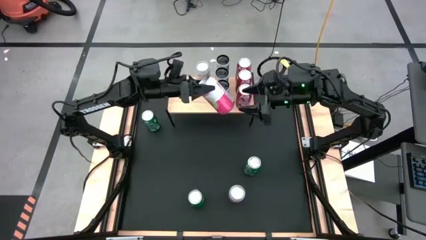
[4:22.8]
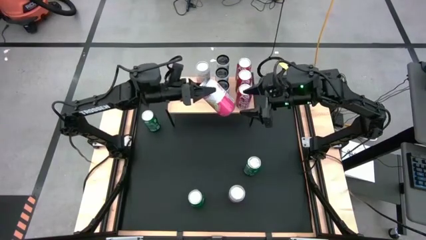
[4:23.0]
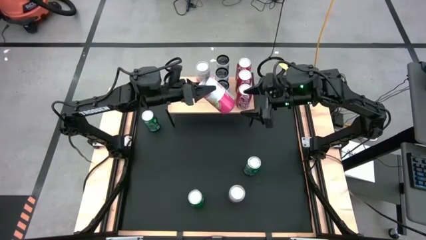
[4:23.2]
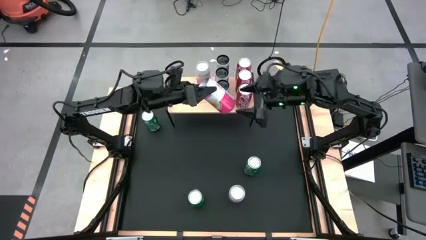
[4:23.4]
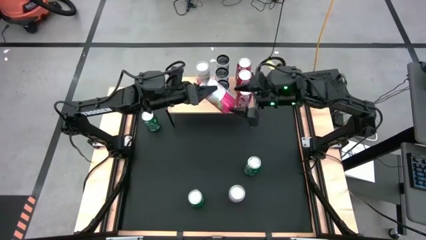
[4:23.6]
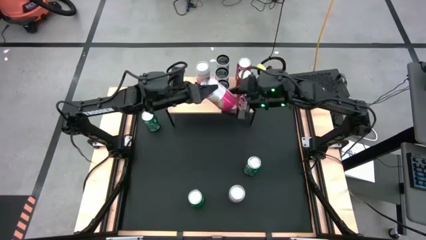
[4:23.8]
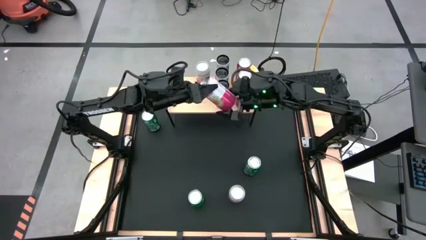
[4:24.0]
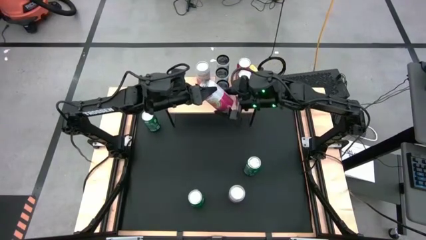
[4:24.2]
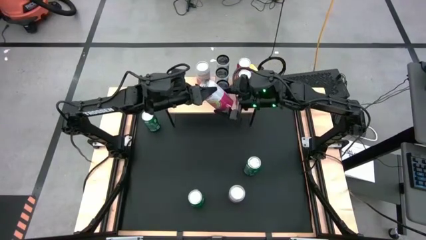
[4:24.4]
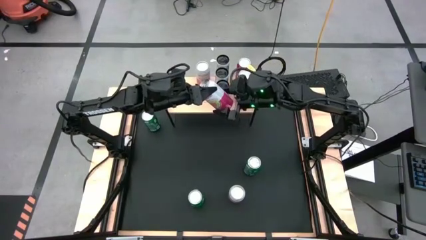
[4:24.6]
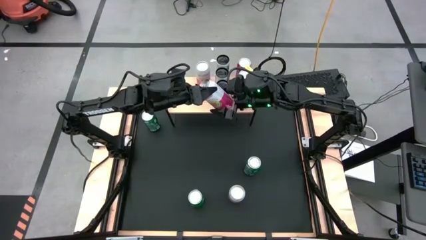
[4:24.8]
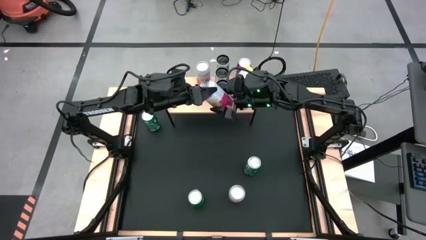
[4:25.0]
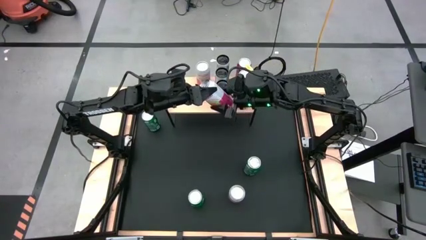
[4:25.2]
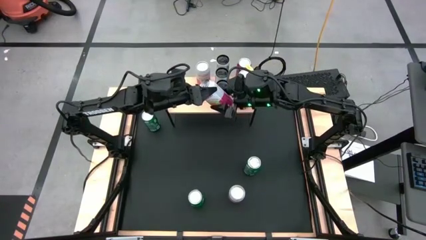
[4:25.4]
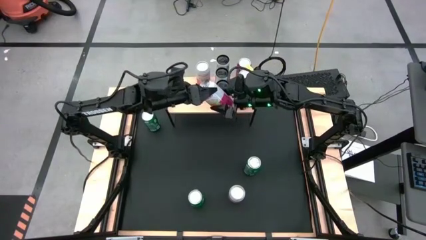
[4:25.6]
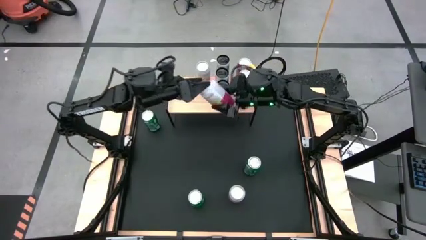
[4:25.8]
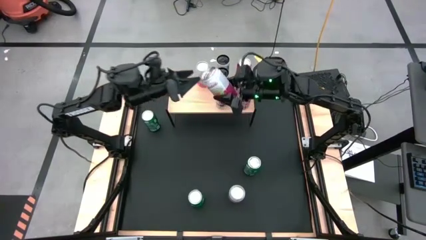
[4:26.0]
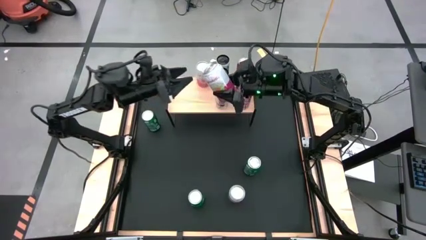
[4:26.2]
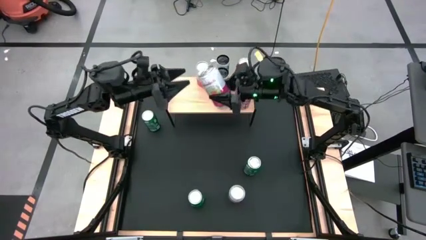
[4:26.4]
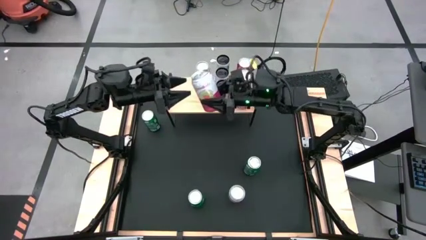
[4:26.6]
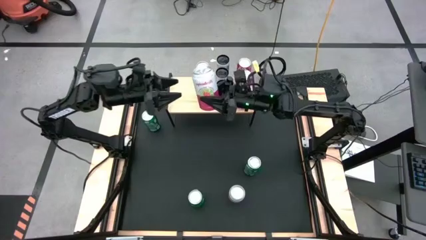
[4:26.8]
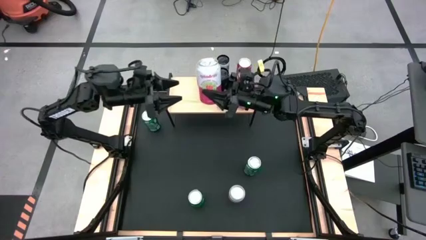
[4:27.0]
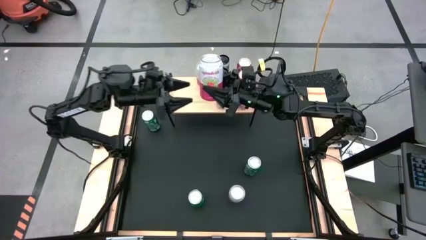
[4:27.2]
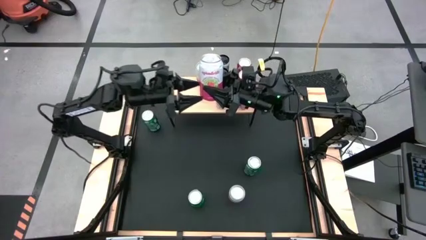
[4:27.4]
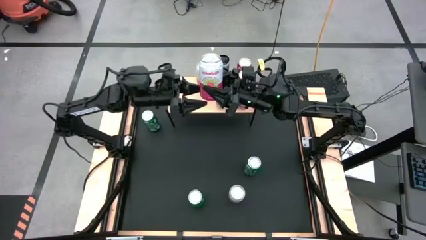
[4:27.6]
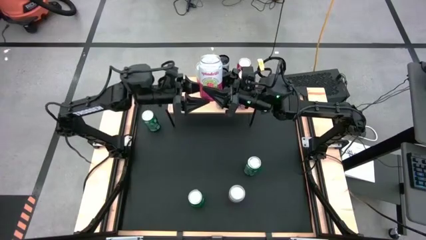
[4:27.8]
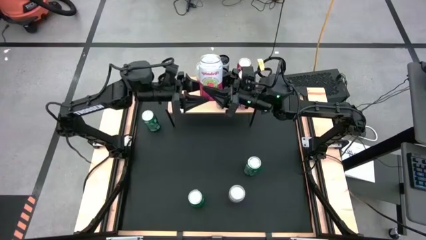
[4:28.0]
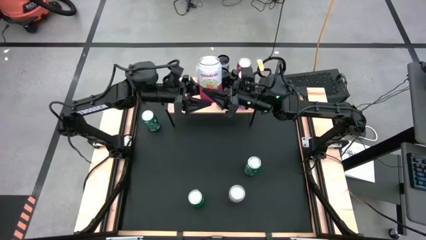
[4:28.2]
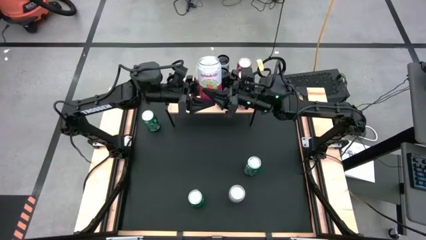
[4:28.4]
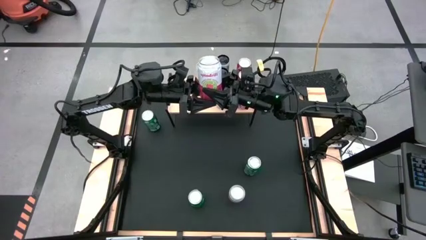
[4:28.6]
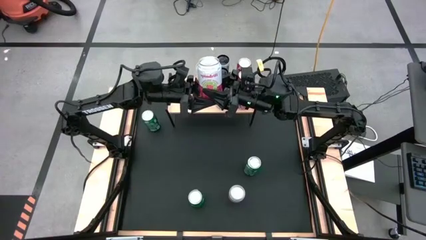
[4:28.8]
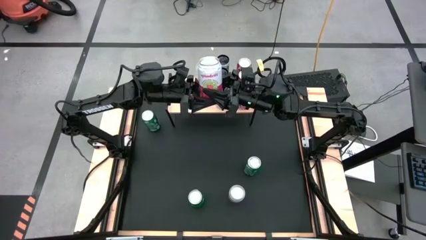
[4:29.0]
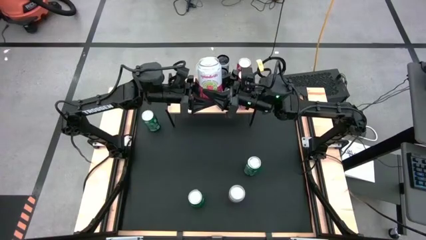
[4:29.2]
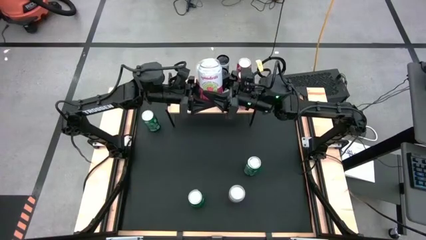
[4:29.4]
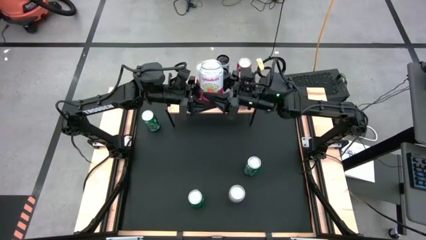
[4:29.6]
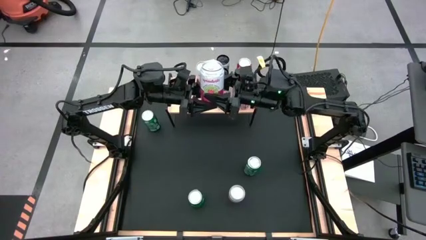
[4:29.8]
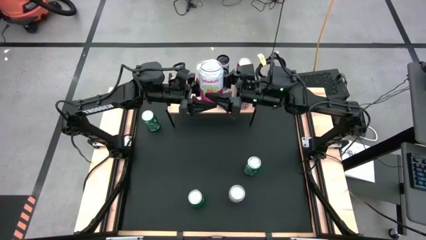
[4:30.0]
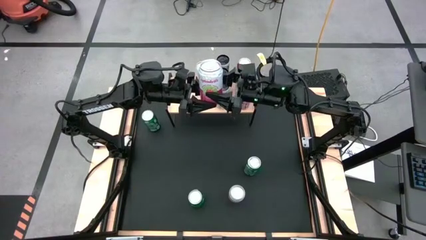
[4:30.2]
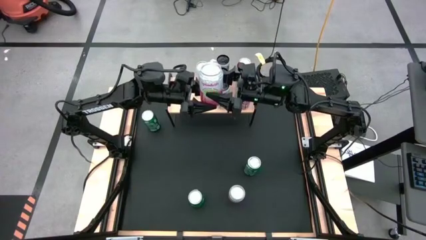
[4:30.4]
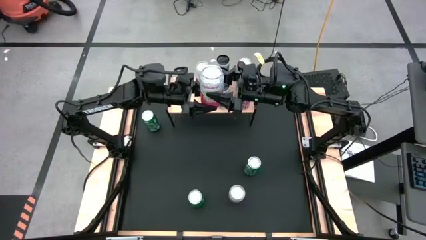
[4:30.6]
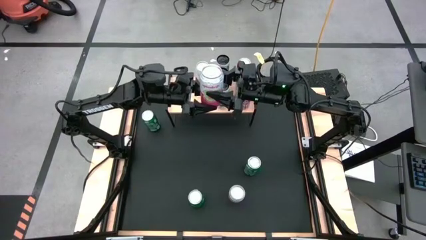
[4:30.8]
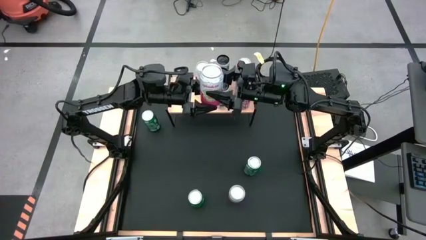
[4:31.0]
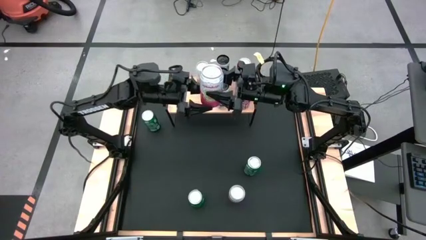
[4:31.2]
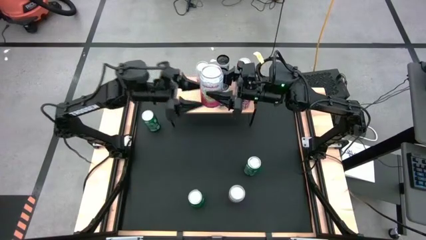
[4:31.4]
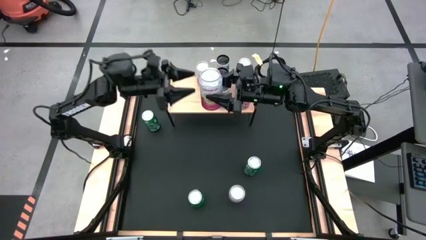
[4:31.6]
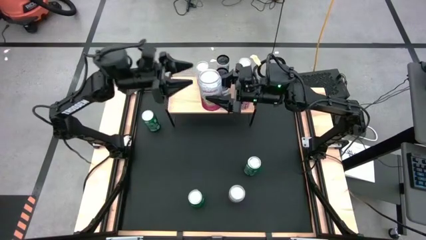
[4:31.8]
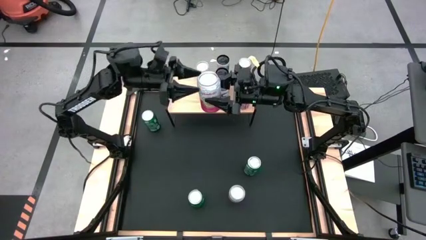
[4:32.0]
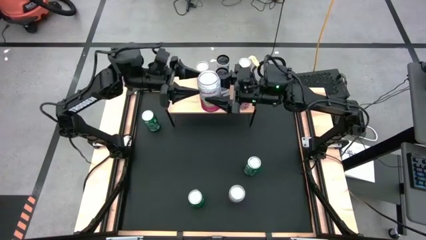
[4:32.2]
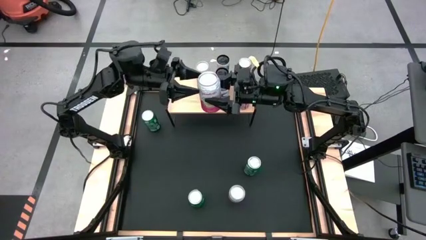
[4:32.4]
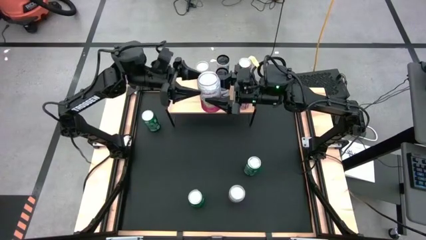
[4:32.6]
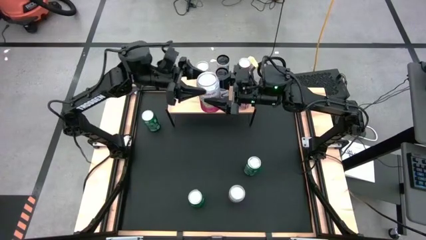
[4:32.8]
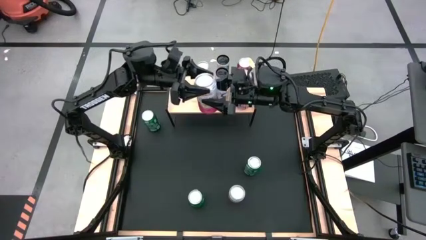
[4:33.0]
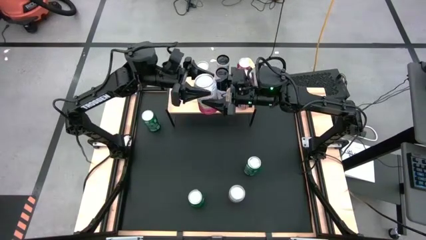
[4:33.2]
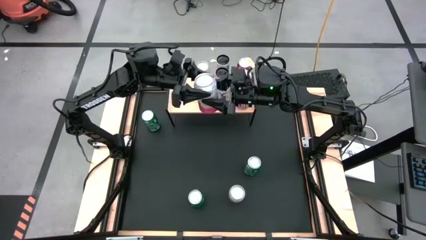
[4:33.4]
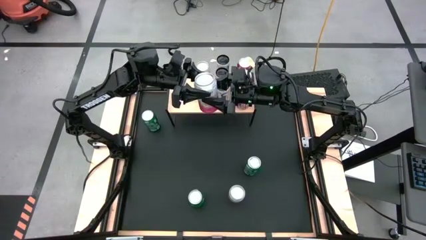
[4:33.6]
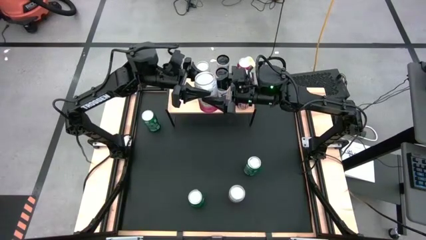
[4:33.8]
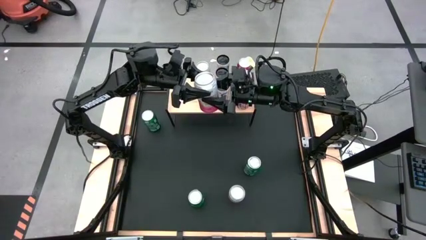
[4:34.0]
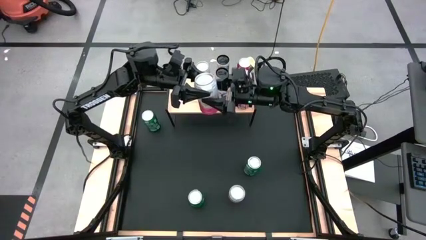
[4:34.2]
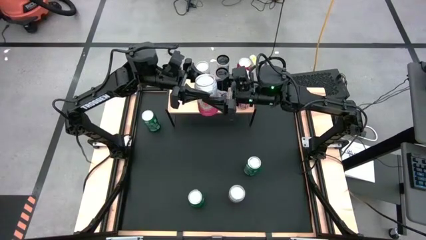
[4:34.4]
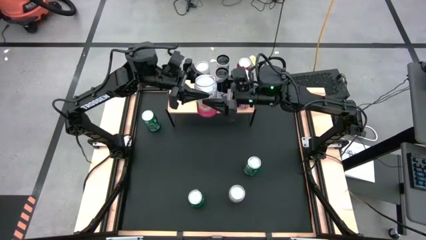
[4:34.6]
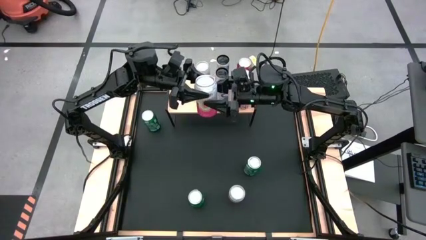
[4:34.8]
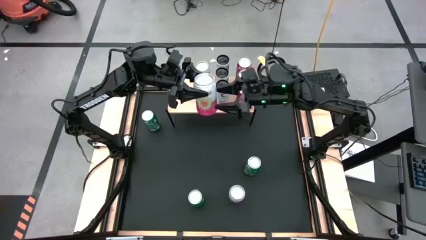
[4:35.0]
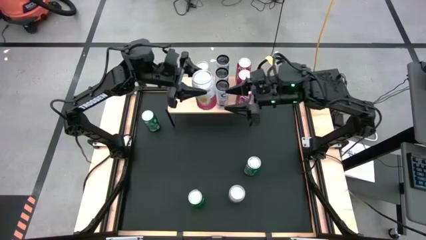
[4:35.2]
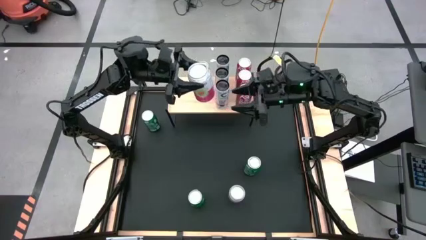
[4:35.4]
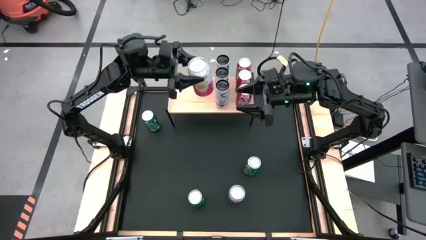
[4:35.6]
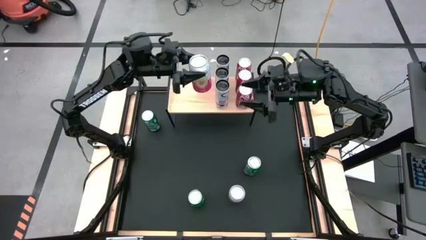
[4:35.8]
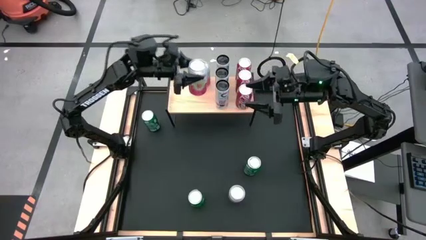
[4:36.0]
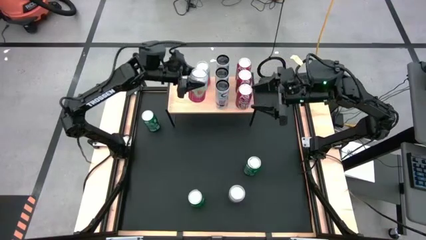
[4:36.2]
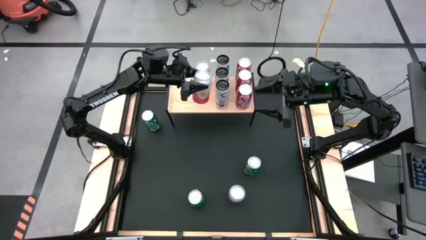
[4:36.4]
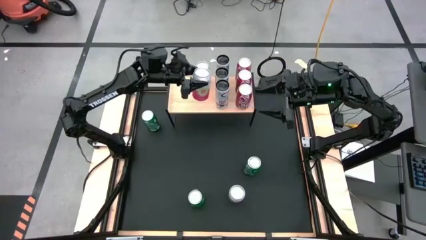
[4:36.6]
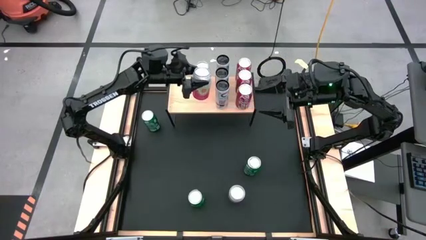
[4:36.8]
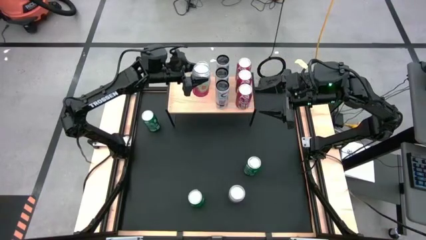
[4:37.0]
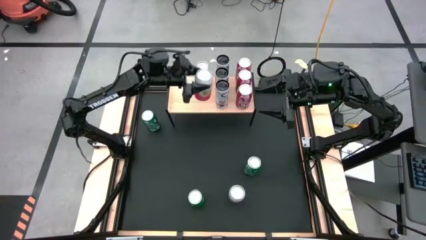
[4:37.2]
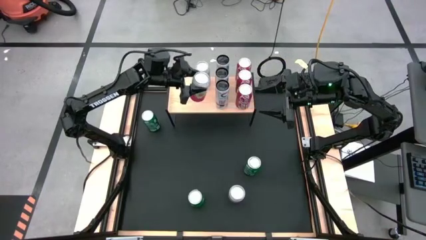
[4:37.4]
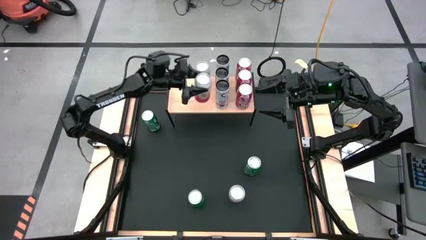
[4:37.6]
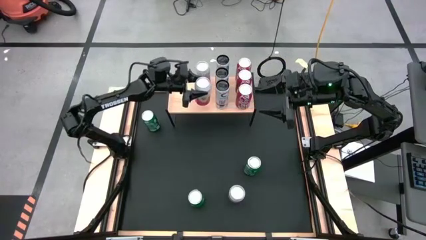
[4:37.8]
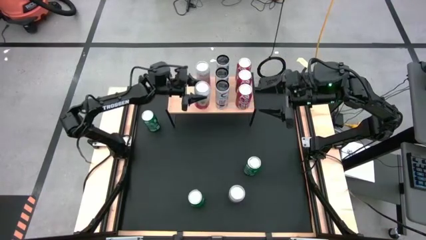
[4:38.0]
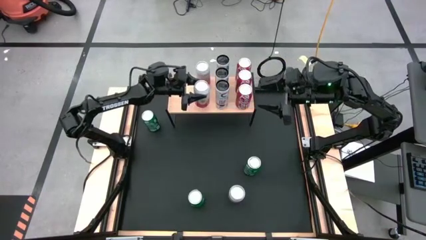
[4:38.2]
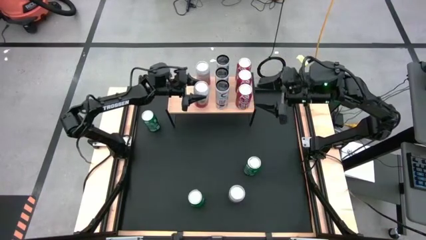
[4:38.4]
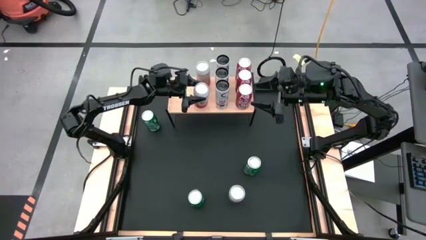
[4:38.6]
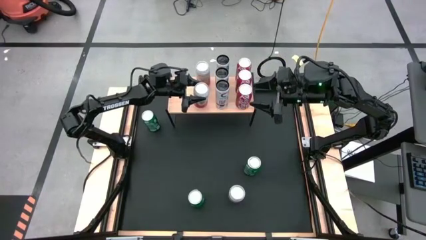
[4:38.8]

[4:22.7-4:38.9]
Task: Place canned beverage on shelf
Put the top pink white soda can aligned with the other pink white soda can on the shelf
